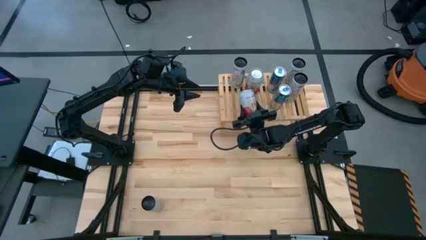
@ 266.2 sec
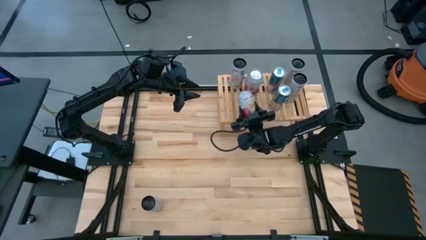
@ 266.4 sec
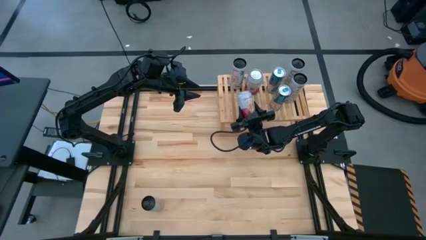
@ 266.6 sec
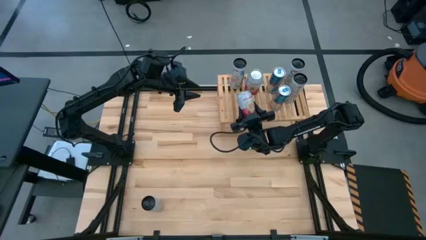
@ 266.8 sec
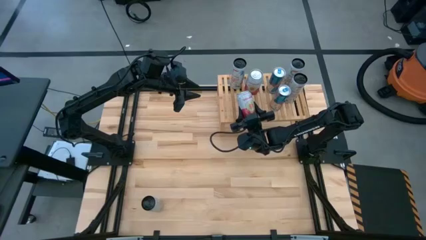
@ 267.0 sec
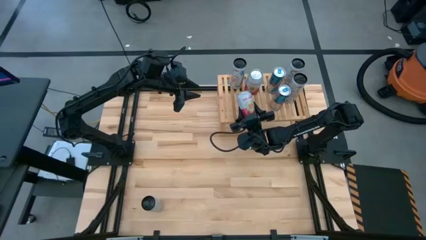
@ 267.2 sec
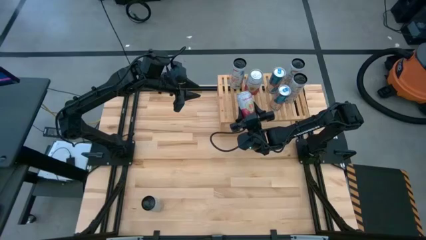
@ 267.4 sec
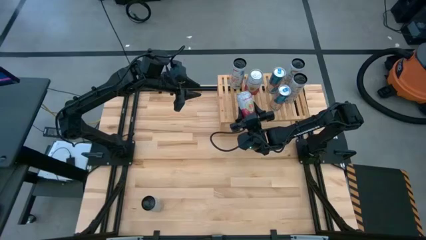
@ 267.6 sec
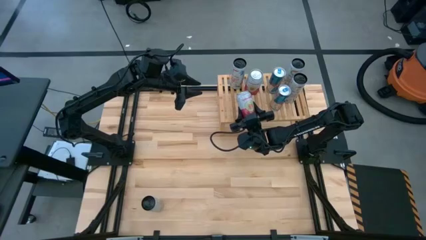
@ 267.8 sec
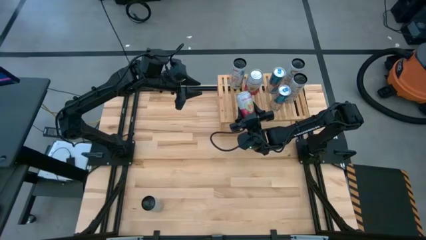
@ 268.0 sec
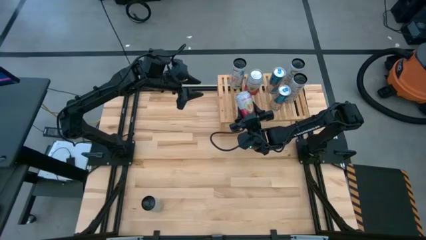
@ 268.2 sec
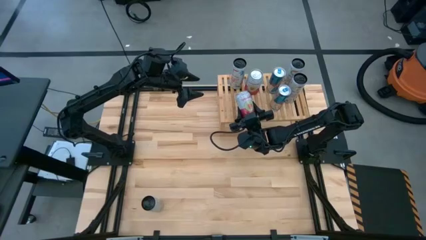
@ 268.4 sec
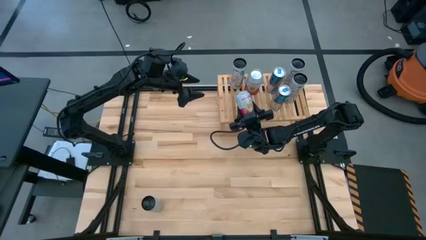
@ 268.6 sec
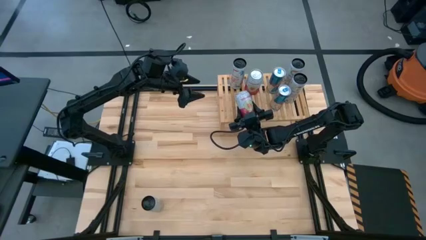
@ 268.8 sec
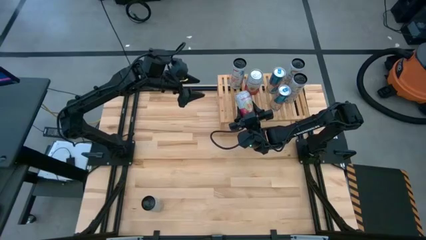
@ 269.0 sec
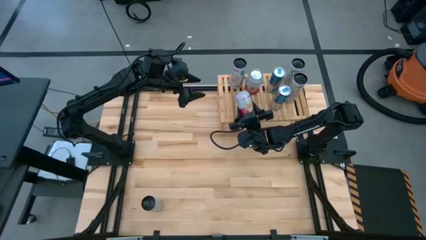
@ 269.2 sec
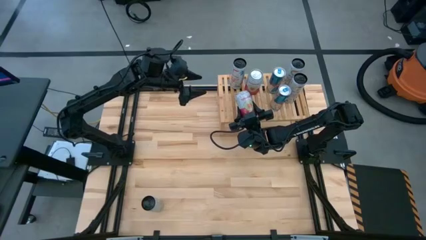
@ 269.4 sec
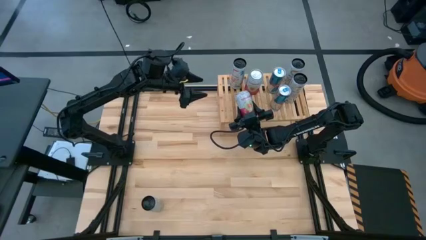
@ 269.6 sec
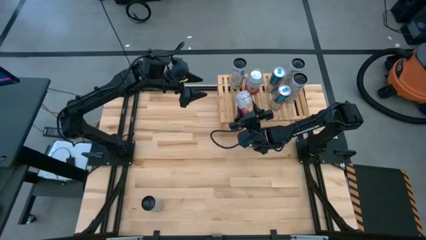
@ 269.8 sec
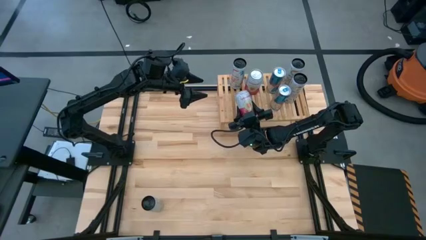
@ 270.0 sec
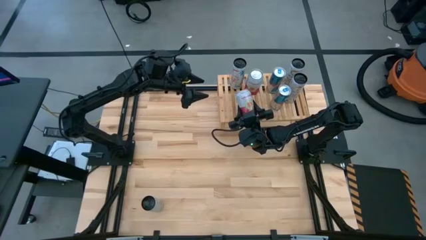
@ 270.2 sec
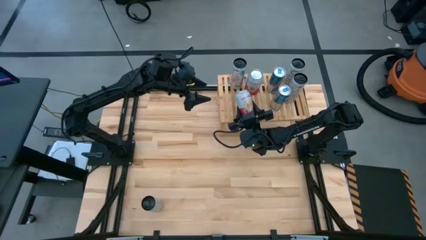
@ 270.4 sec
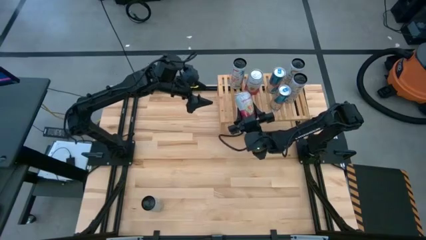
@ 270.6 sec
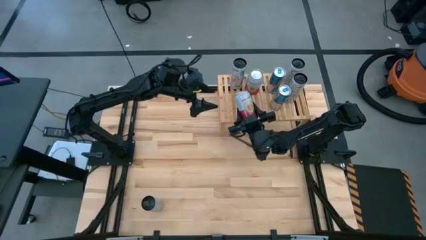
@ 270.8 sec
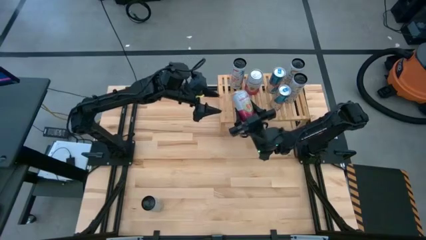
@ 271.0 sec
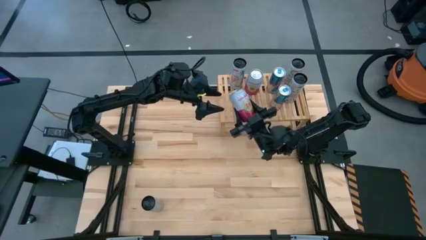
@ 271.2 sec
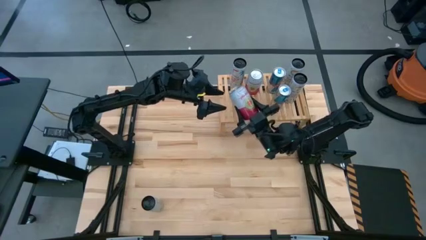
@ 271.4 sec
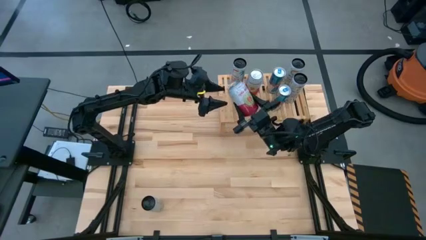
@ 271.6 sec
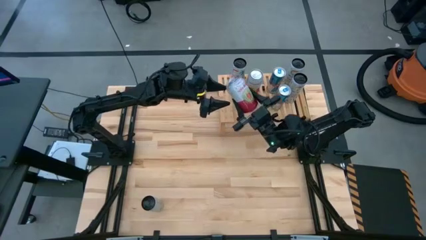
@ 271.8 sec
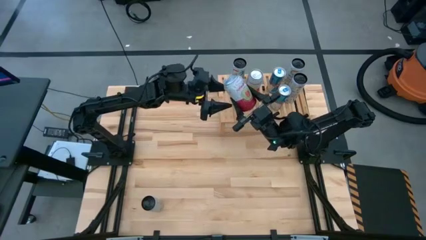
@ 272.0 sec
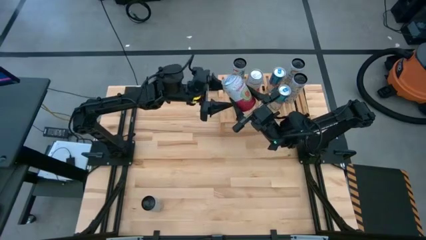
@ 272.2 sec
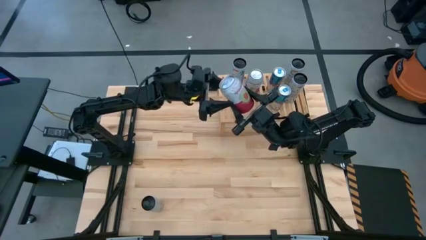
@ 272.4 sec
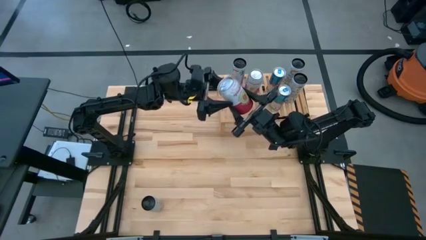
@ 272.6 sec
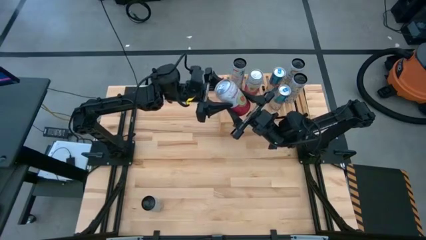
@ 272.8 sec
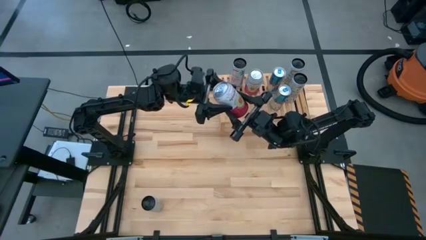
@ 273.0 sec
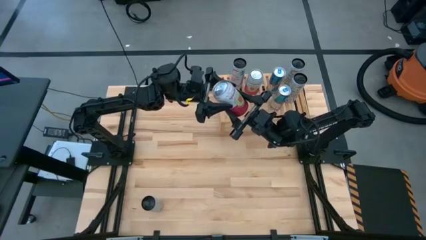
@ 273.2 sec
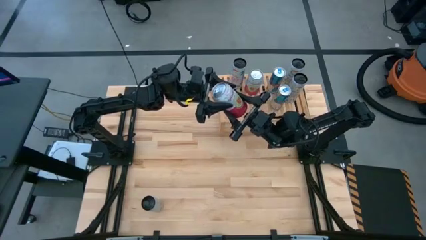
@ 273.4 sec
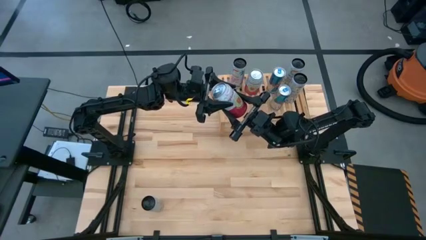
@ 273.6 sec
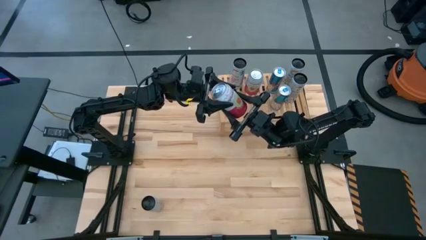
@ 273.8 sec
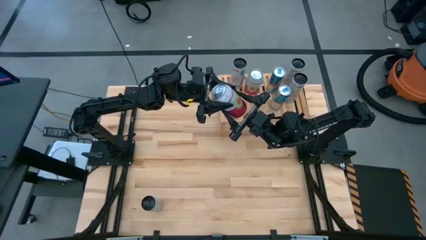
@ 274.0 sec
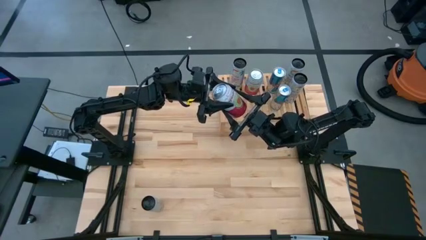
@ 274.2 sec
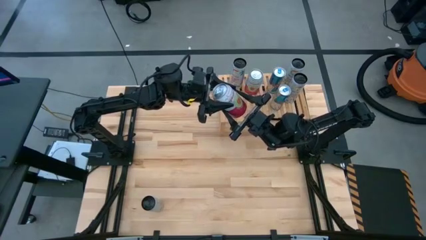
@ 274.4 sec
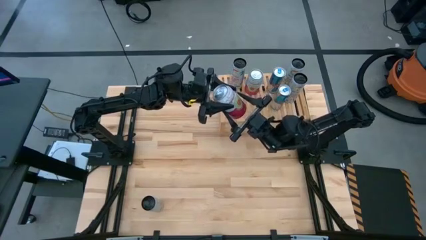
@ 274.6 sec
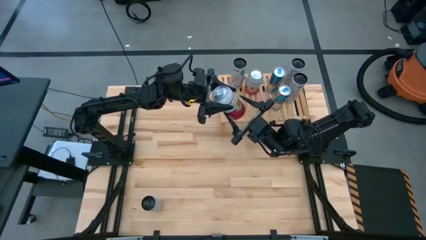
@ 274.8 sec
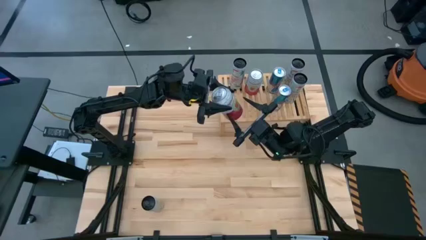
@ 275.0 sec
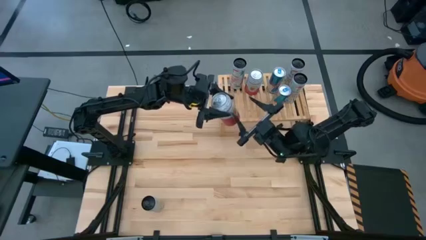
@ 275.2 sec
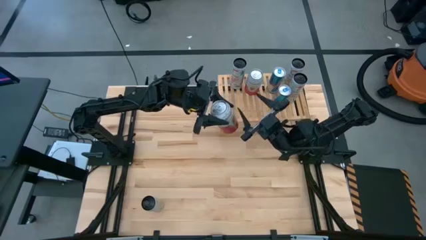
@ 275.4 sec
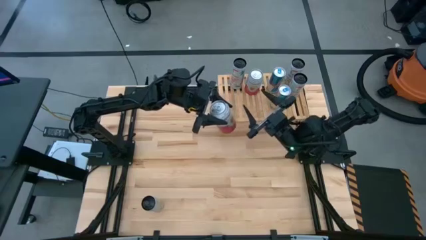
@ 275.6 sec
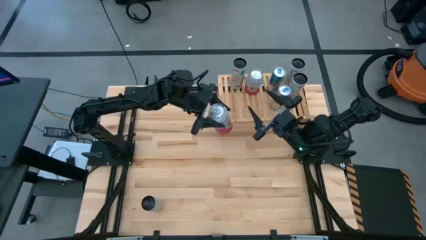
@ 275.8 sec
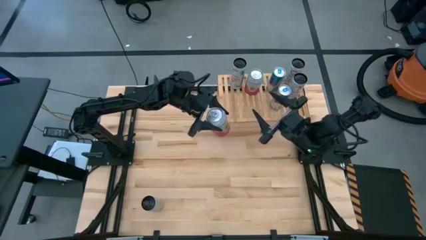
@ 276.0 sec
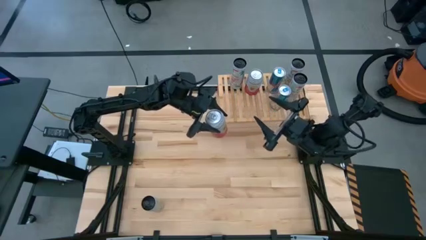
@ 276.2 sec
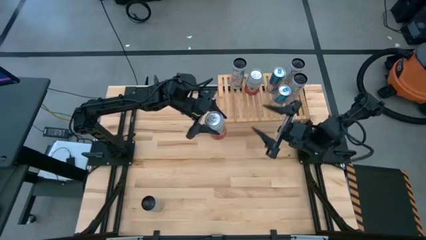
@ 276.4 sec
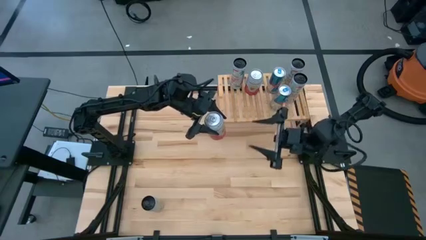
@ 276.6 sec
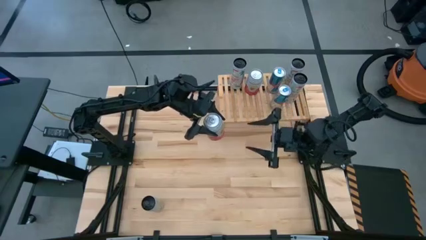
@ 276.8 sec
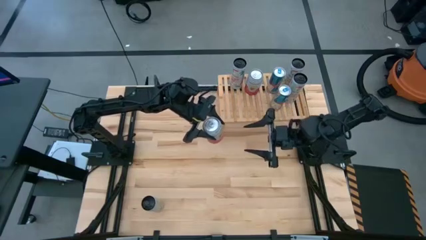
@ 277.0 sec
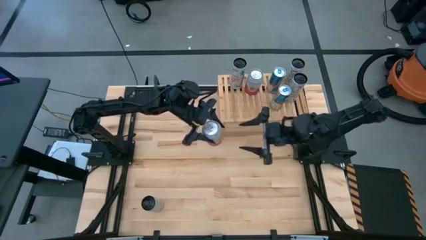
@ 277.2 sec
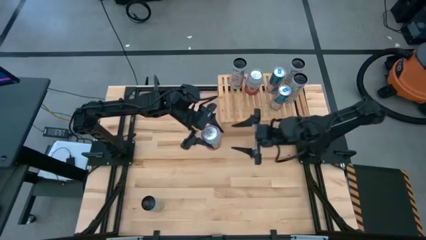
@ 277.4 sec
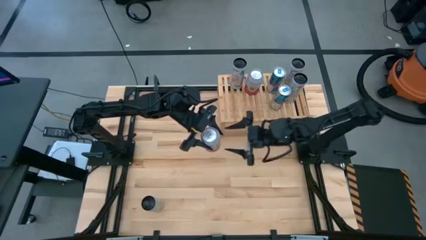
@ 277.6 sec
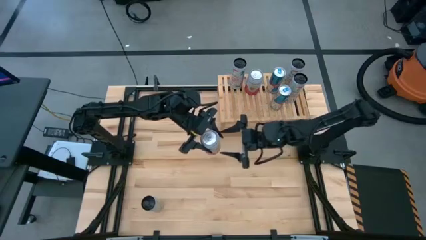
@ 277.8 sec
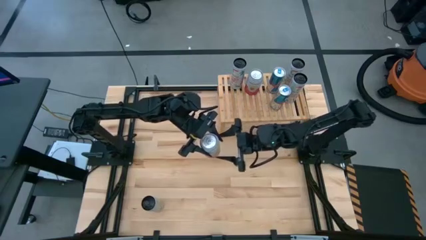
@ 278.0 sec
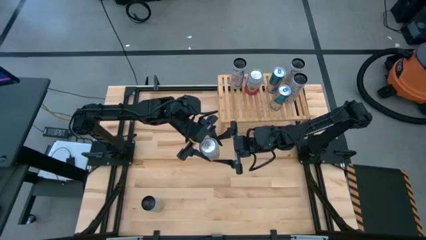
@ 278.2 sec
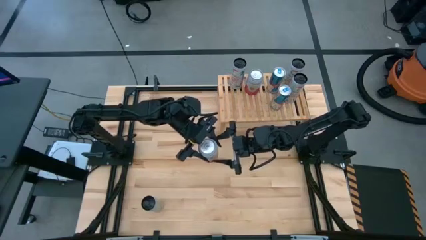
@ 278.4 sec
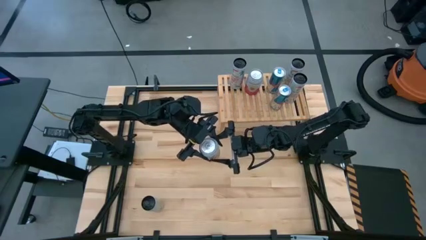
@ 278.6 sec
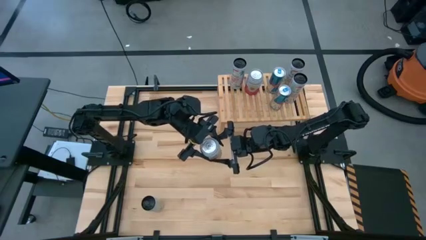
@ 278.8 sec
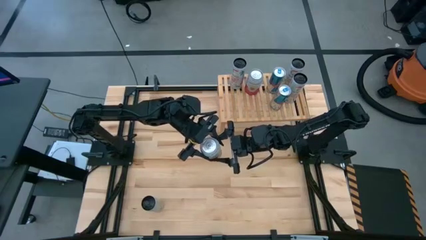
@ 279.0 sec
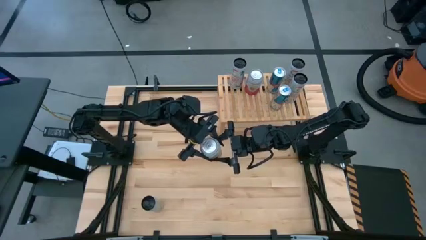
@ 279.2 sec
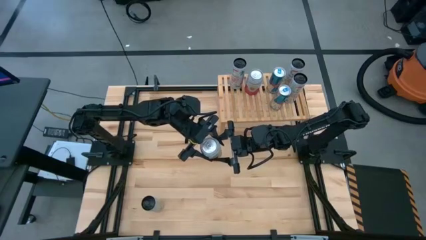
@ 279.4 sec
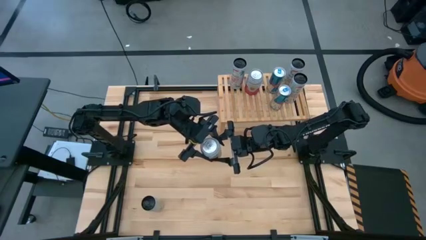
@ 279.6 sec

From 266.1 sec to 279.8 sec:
Task: Place canned beverage on shelf
Put the pink-white soda can on the shelf aligned with the other pink-white soda can
